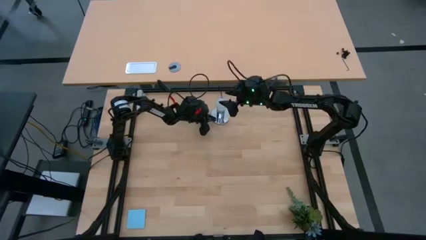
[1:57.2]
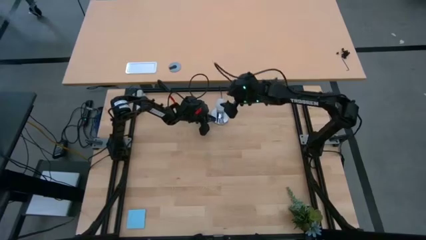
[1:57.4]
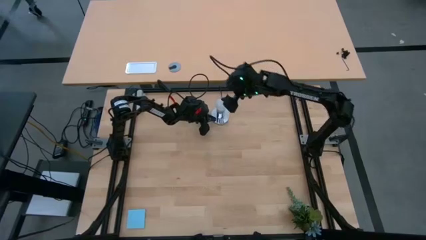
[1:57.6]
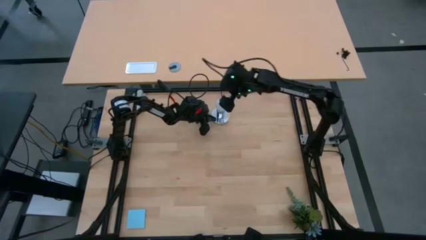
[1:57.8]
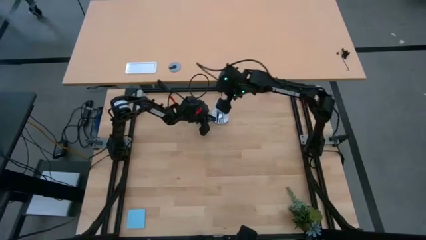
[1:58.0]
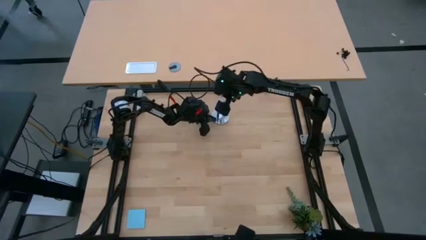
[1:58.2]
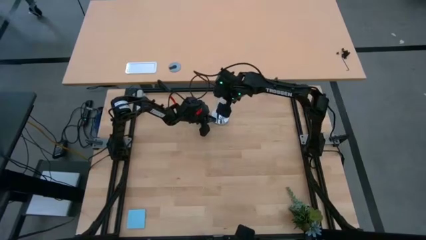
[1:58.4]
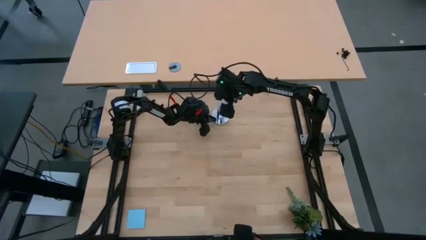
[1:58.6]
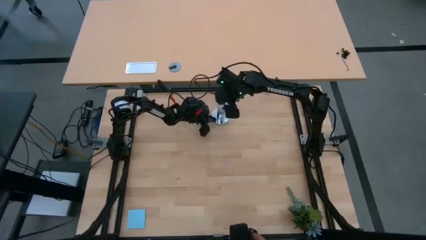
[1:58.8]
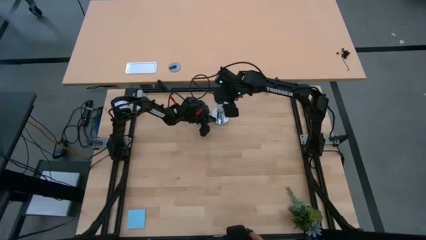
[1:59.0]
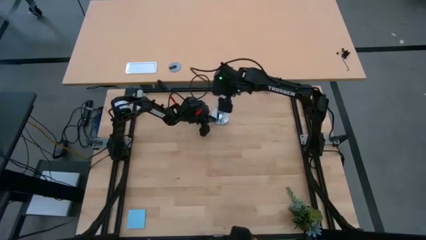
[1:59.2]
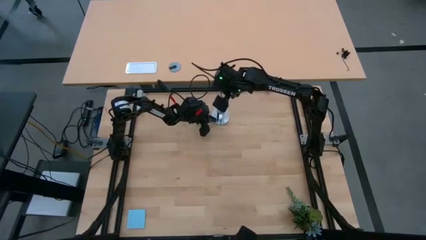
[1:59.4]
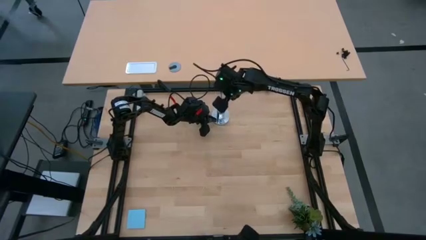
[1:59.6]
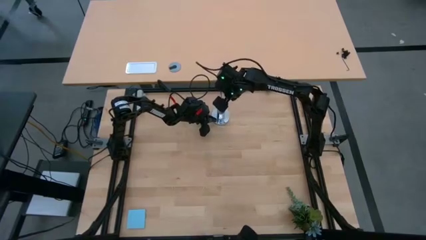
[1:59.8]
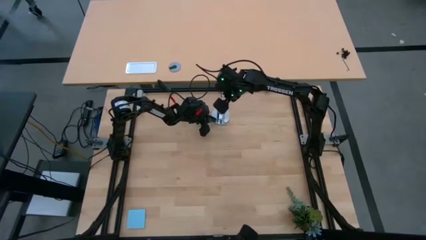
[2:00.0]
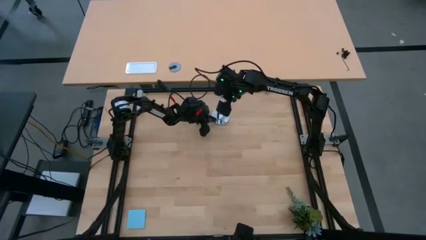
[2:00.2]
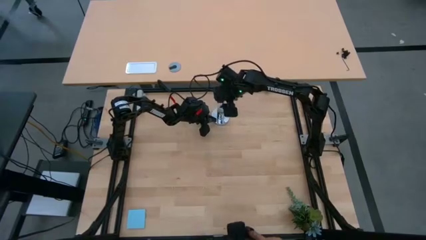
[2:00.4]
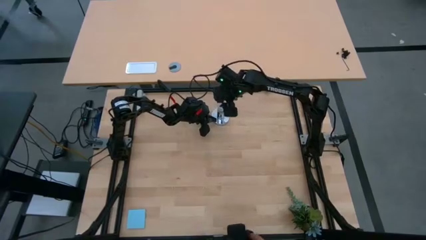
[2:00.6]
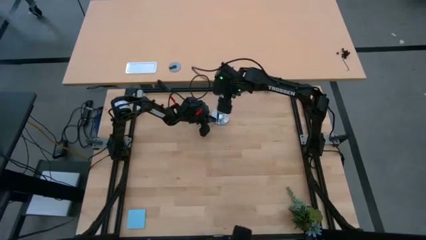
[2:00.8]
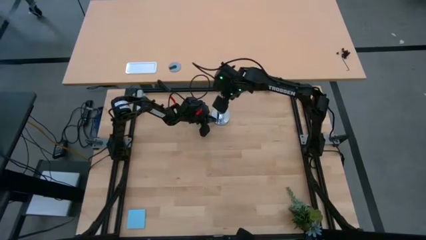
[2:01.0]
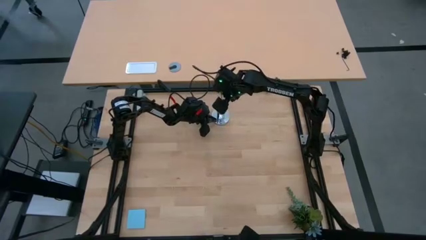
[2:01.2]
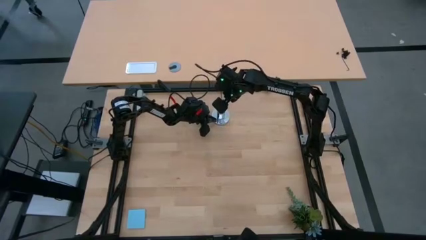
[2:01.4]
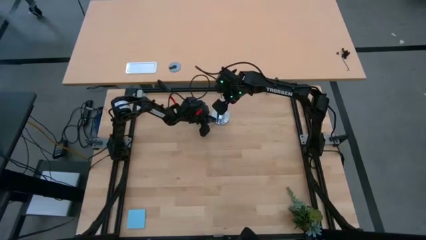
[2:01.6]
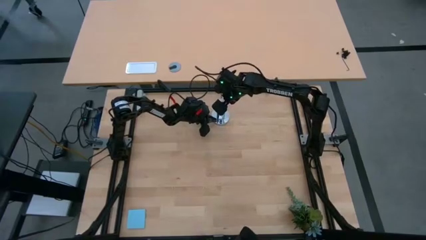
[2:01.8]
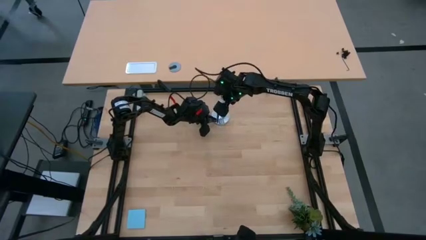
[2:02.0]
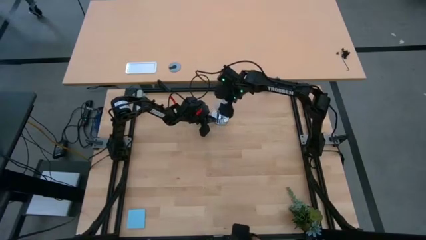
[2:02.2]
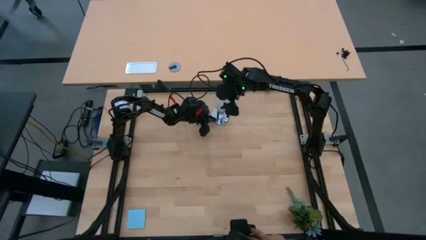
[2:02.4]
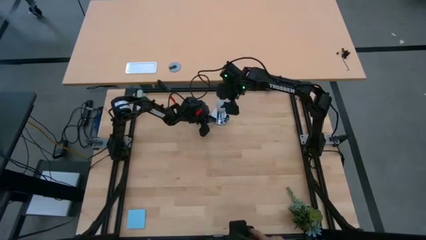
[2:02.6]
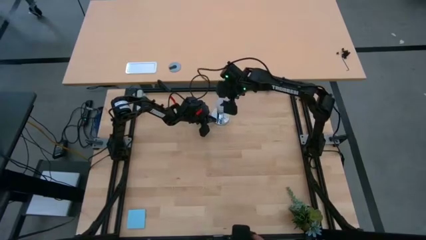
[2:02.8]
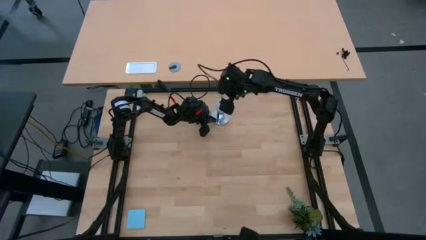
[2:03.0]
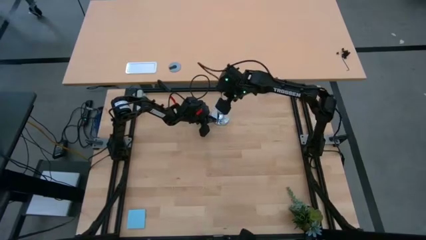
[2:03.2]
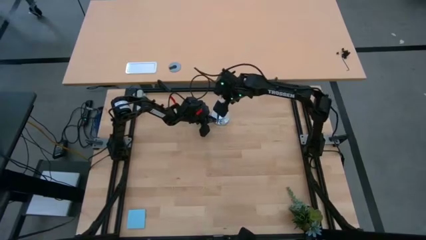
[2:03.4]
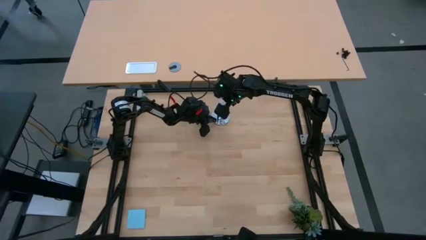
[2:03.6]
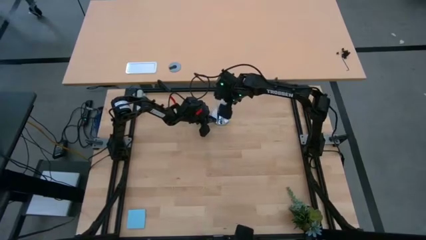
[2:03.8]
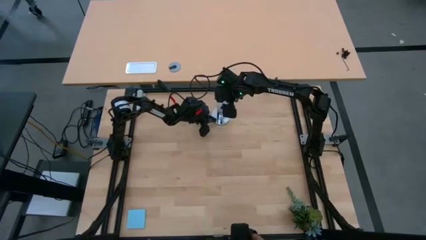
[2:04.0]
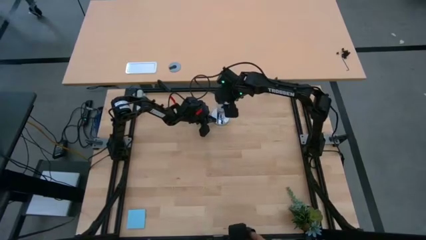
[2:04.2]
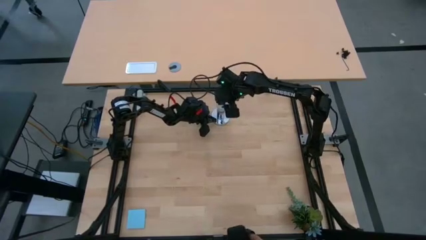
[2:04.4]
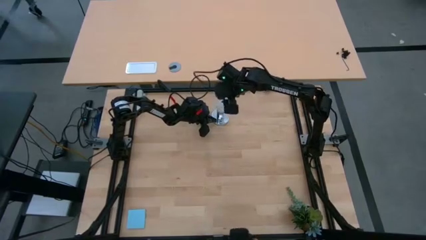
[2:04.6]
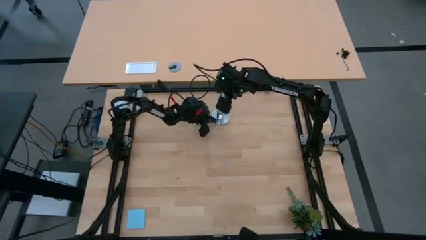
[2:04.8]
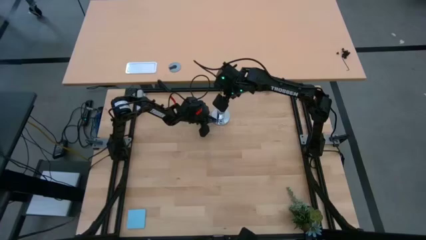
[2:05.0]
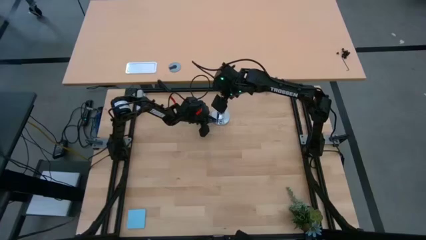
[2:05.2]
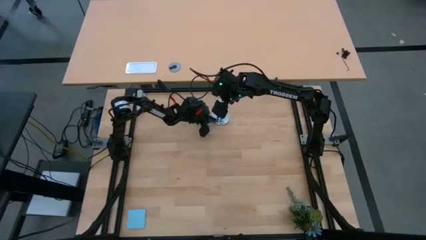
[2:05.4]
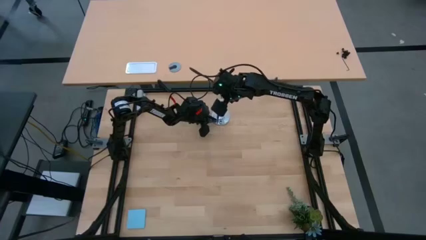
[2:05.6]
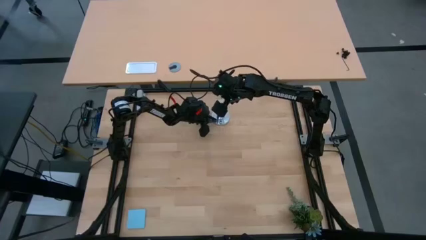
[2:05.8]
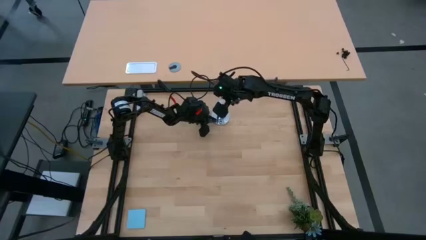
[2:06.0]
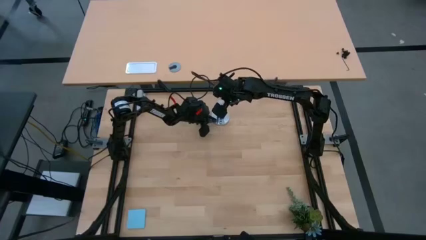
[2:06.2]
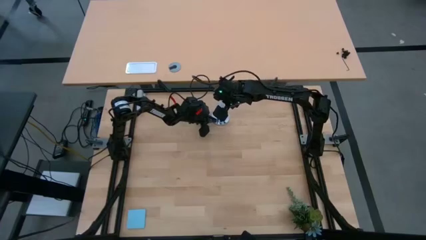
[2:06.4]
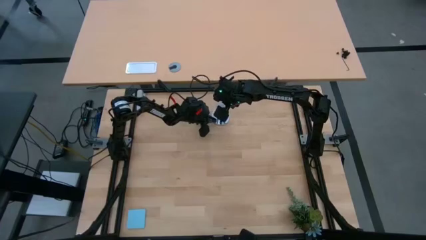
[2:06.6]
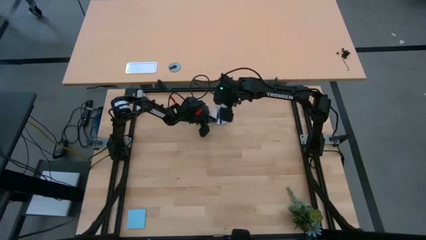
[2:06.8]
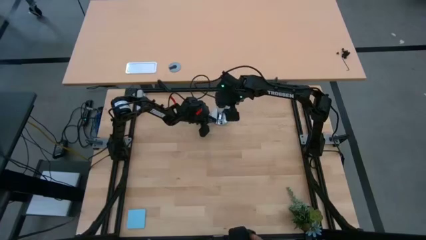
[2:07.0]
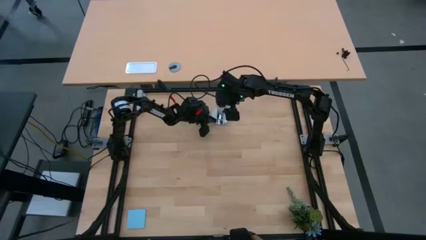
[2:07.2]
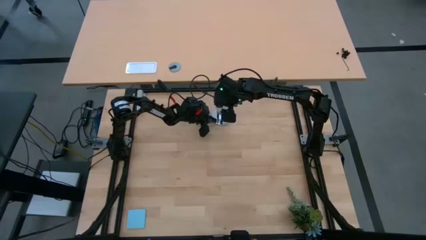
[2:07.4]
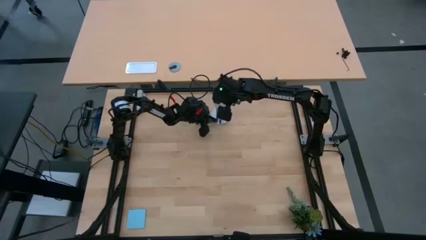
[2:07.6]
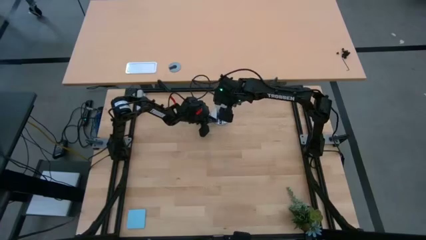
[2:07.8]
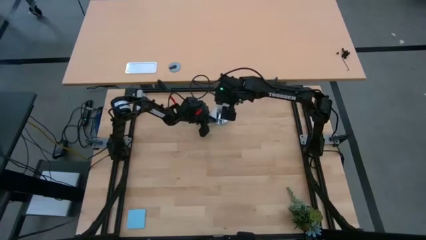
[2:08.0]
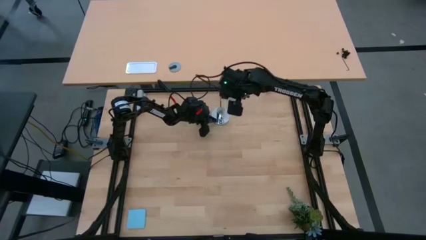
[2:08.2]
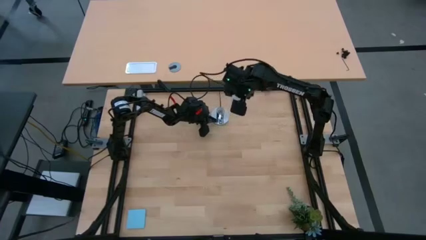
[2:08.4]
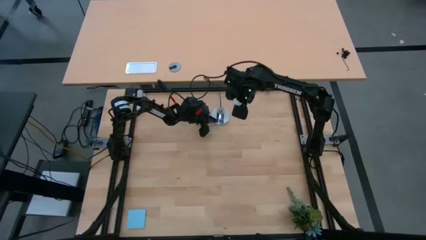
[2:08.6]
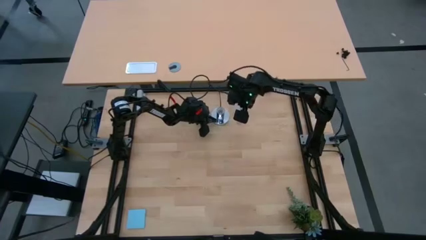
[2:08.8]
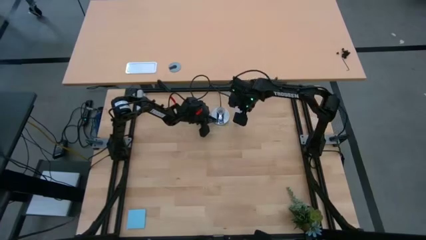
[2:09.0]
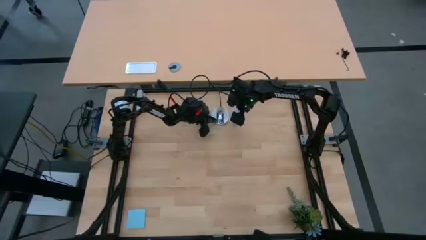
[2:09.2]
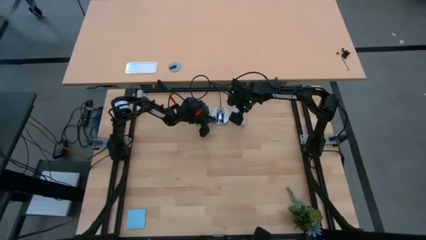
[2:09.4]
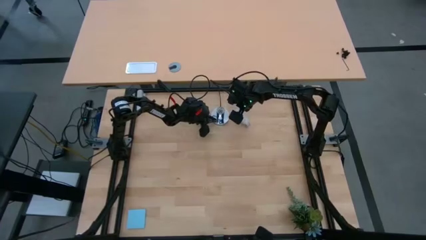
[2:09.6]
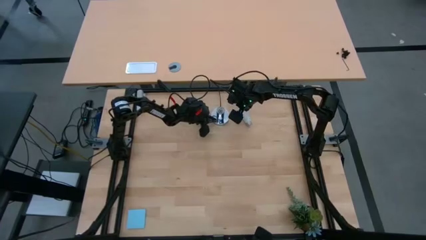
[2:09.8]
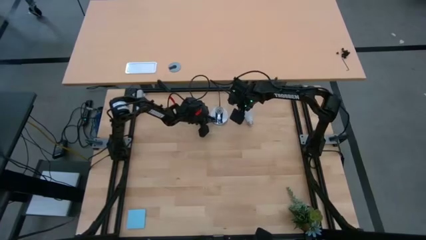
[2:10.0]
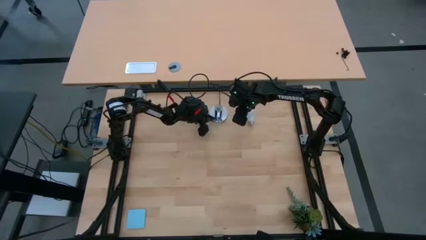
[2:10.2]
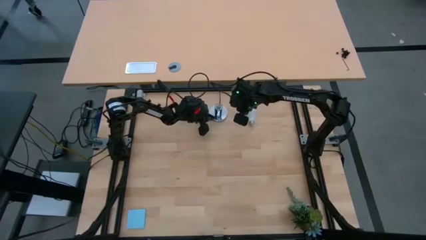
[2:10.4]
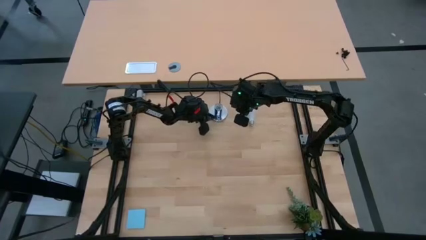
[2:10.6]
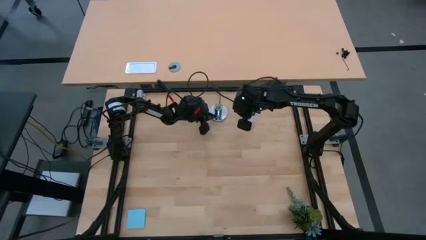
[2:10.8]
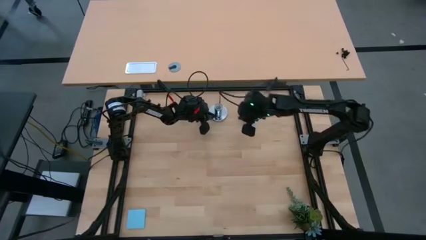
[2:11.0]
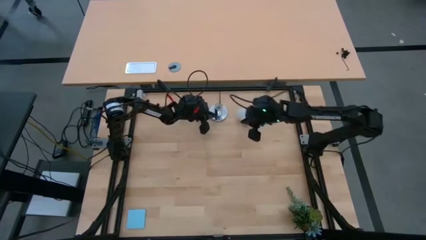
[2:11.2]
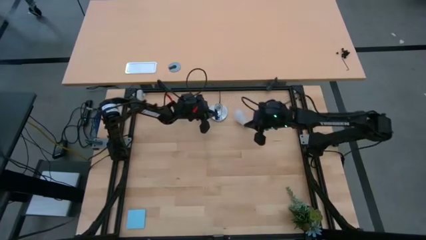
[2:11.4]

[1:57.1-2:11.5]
Task: Screw lightbulb
Remove the white lightbulb from the silver lamp

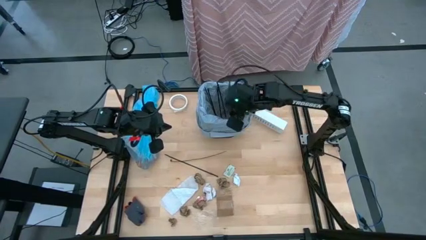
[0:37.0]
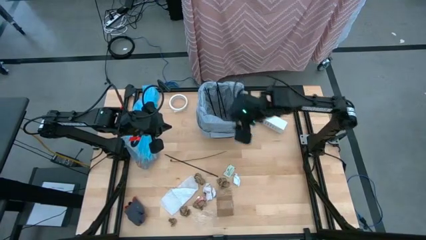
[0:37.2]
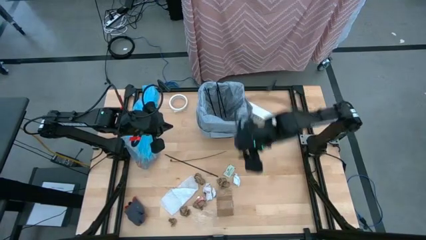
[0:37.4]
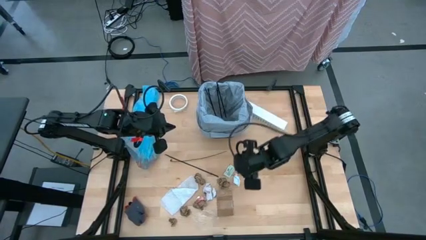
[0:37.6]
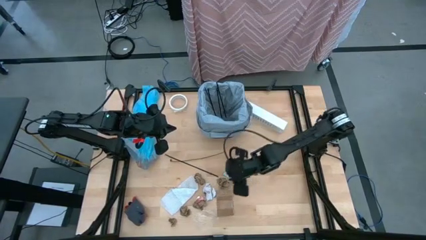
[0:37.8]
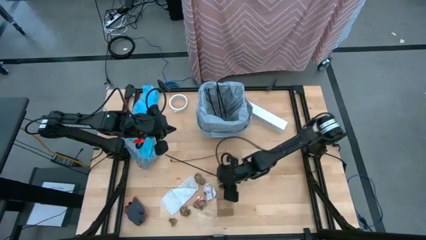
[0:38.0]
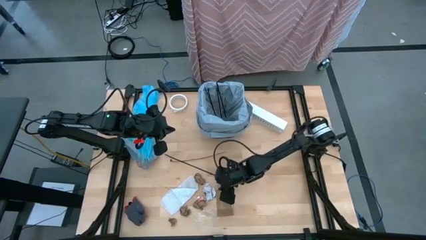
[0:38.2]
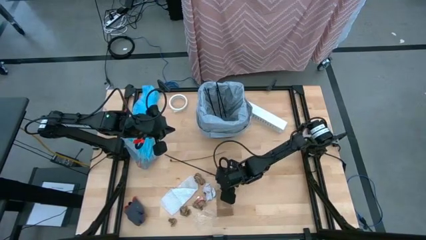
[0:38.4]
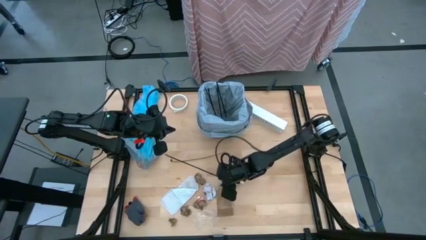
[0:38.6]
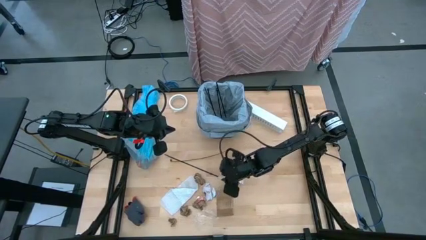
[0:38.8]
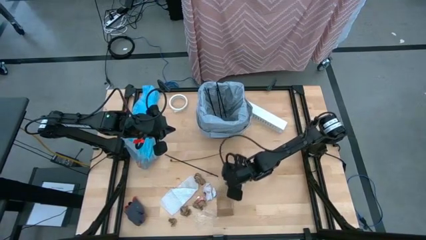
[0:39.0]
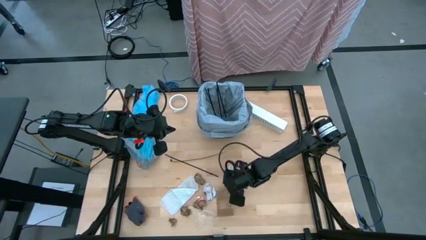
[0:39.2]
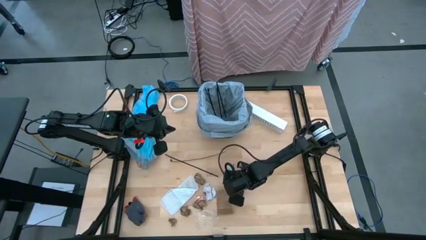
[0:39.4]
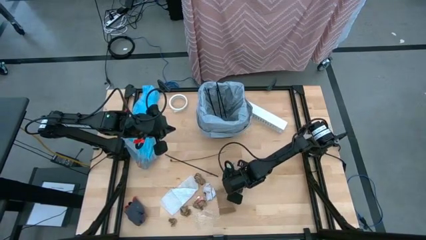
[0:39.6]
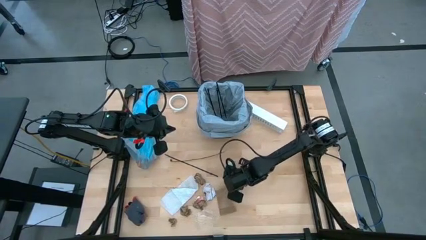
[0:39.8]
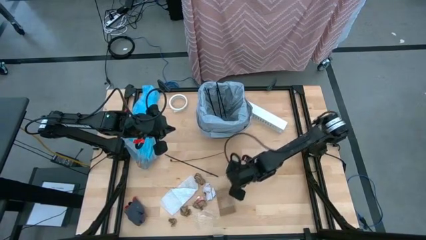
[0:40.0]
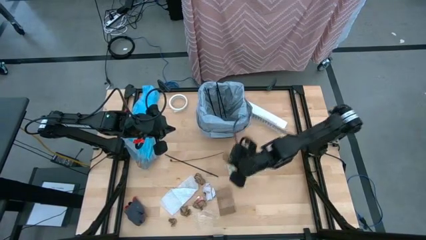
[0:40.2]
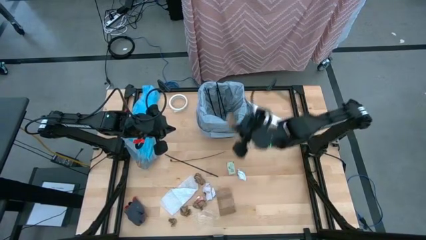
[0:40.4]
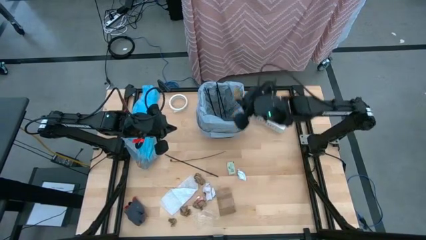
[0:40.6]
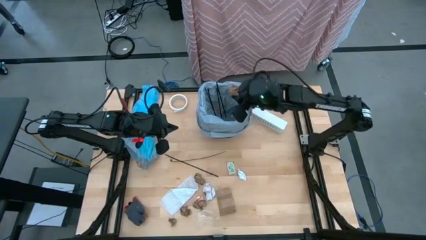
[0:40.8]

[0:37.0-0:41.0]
Task: place trash/remove bag and relplace
Put the brown napkin into the trash bin
